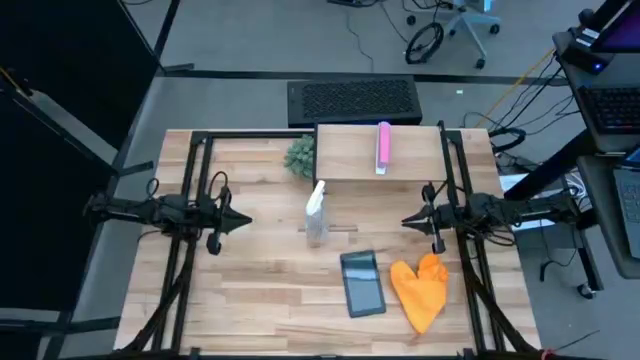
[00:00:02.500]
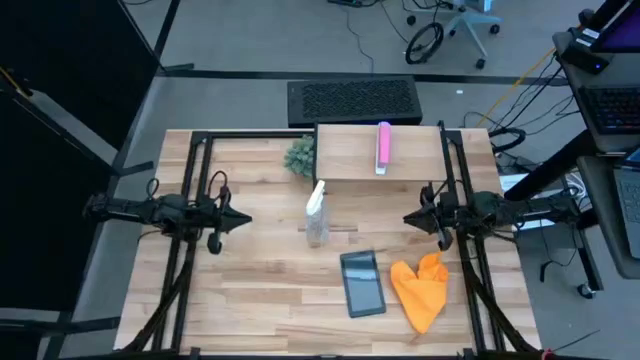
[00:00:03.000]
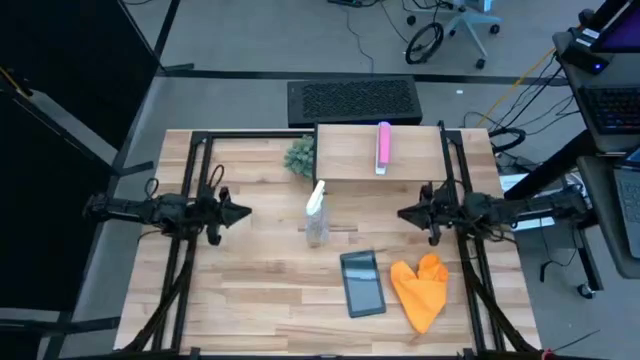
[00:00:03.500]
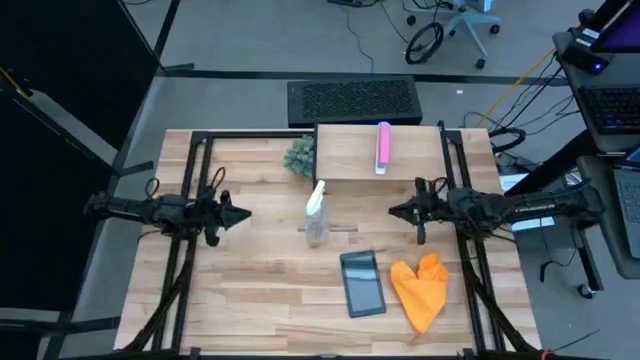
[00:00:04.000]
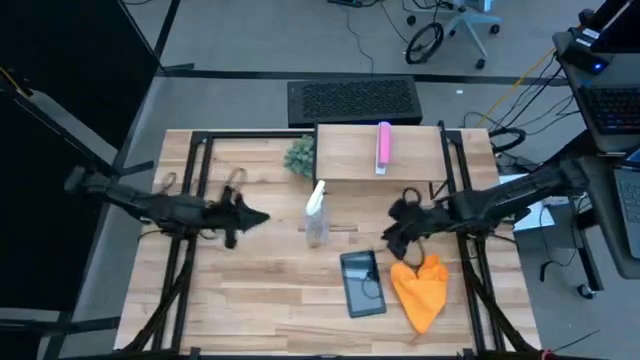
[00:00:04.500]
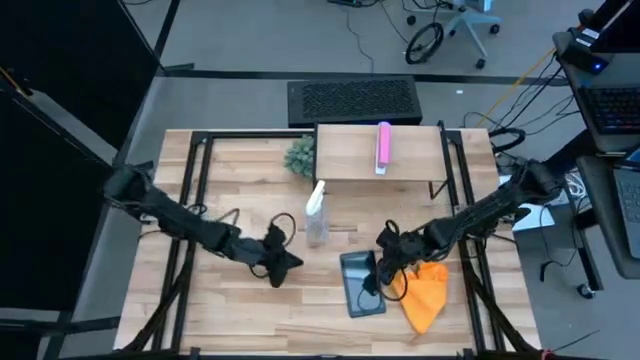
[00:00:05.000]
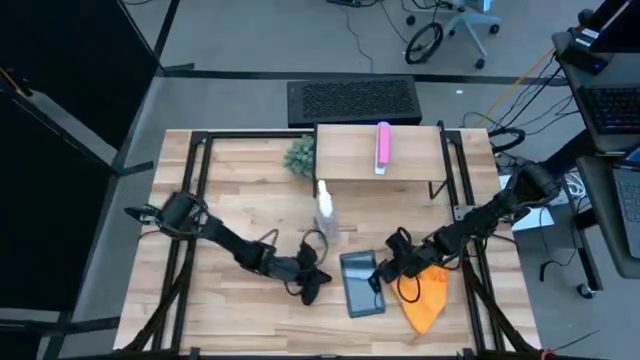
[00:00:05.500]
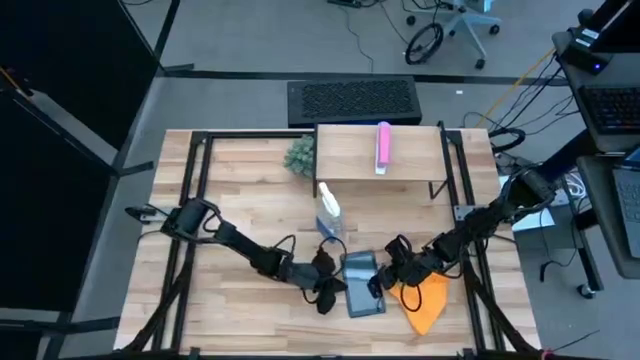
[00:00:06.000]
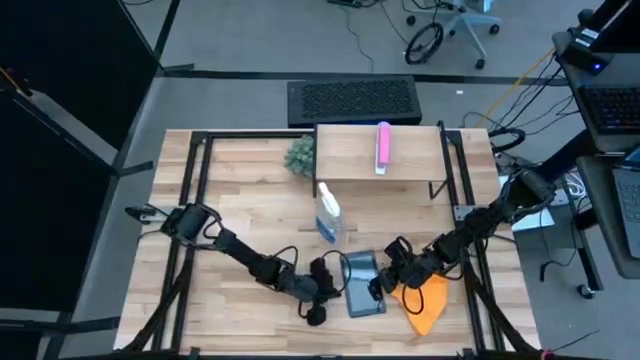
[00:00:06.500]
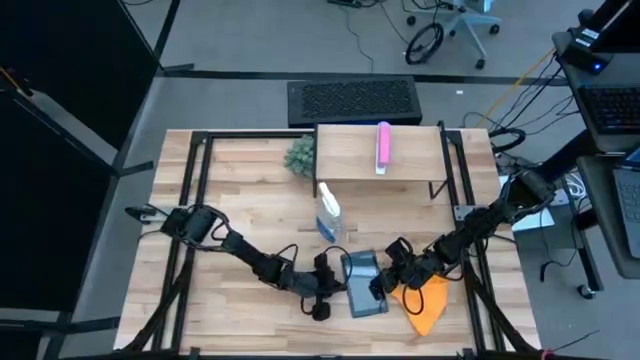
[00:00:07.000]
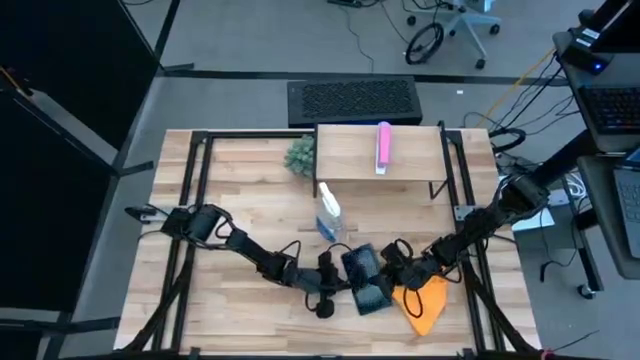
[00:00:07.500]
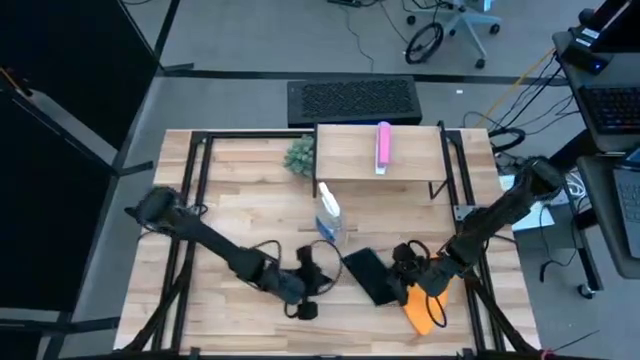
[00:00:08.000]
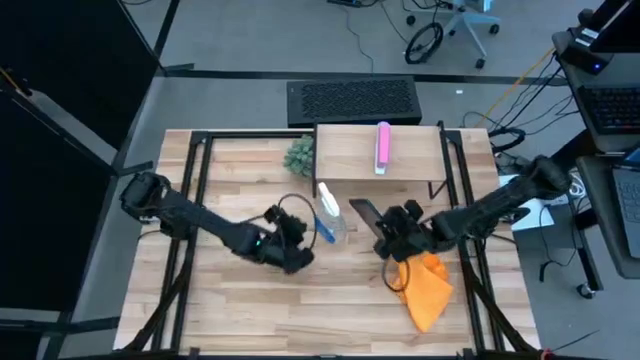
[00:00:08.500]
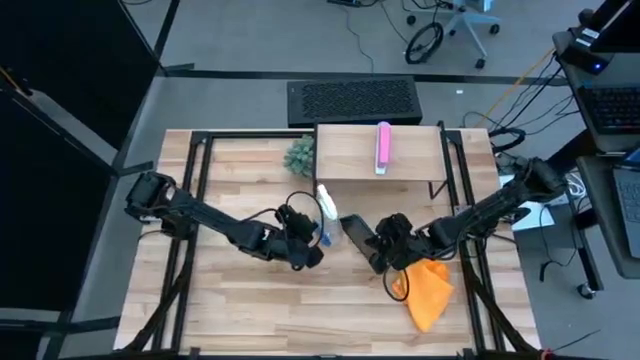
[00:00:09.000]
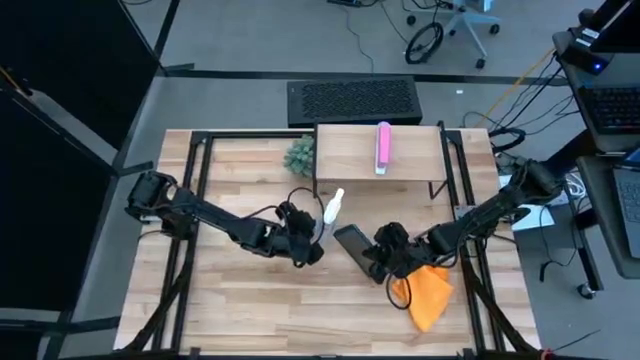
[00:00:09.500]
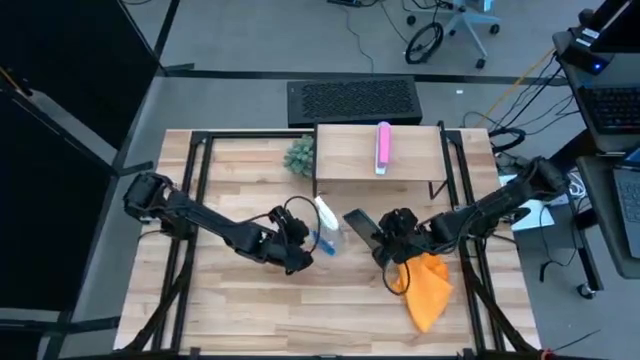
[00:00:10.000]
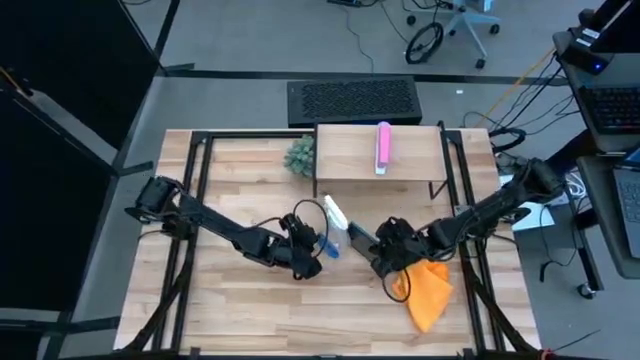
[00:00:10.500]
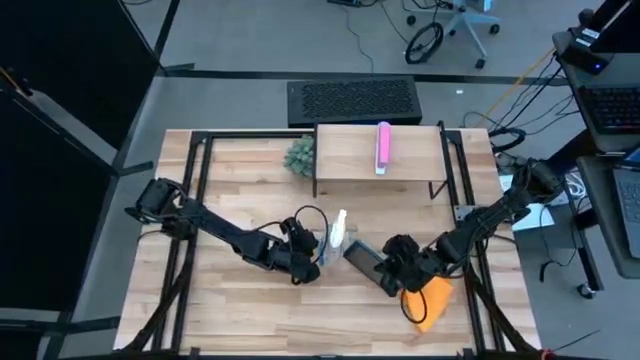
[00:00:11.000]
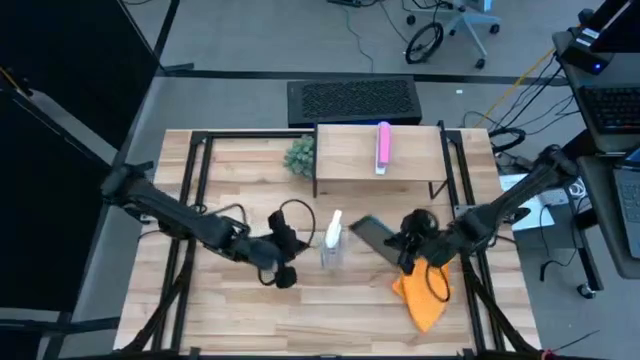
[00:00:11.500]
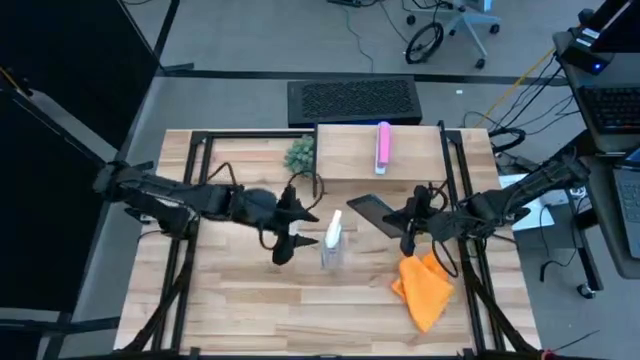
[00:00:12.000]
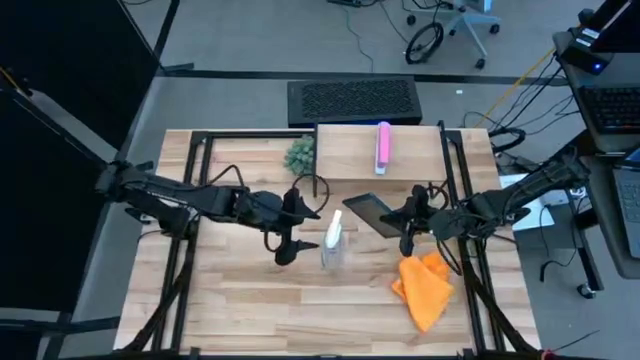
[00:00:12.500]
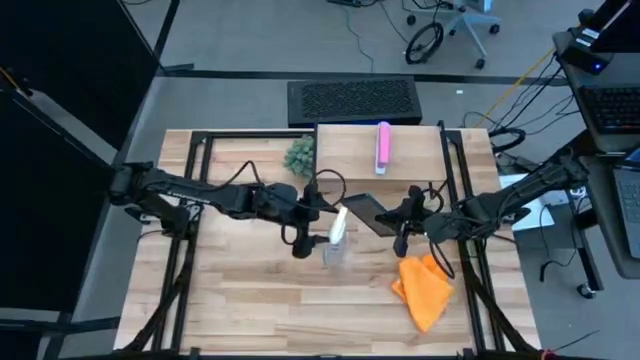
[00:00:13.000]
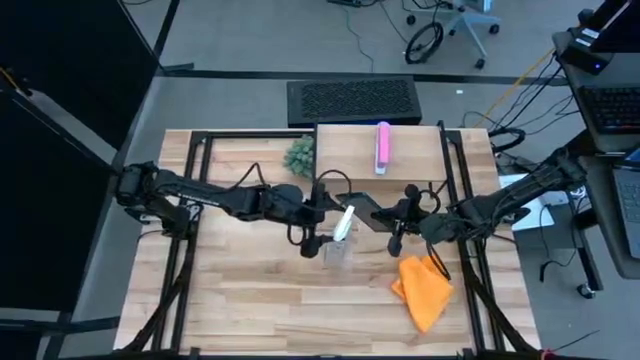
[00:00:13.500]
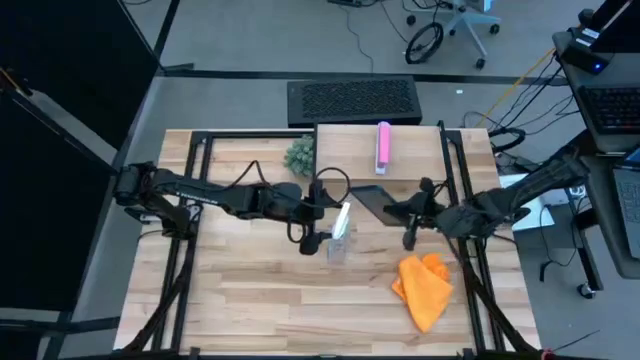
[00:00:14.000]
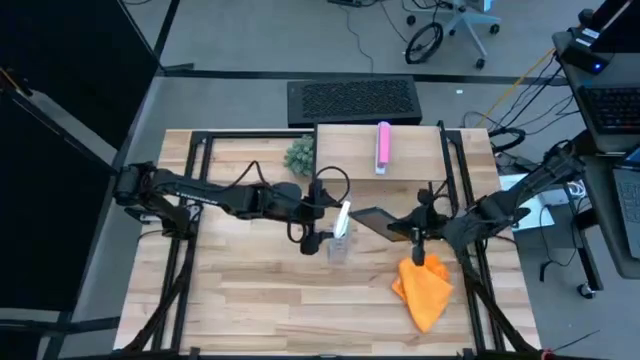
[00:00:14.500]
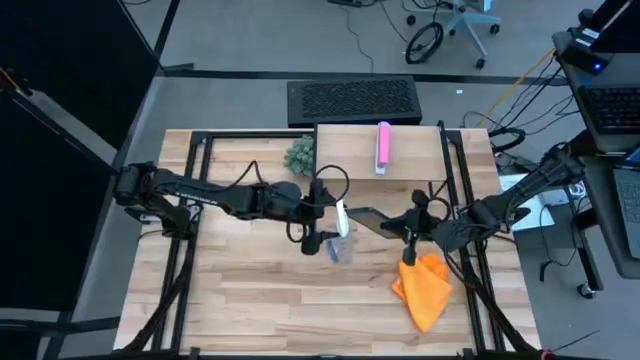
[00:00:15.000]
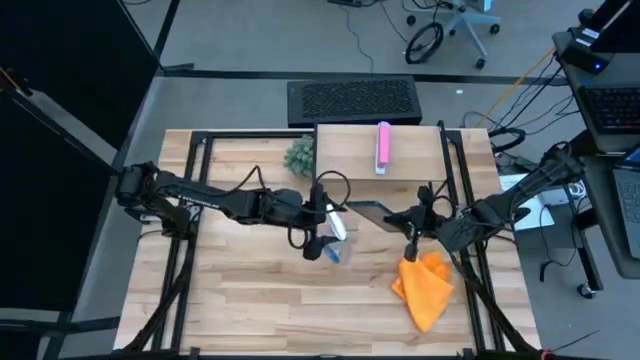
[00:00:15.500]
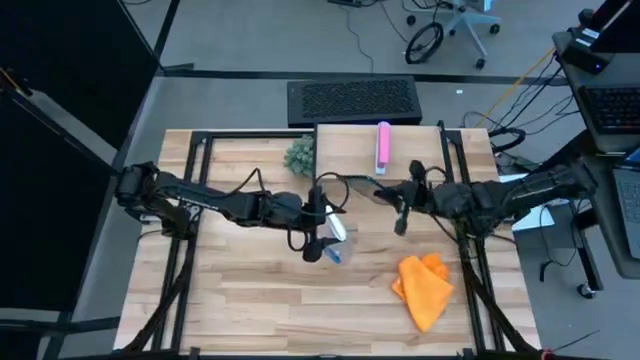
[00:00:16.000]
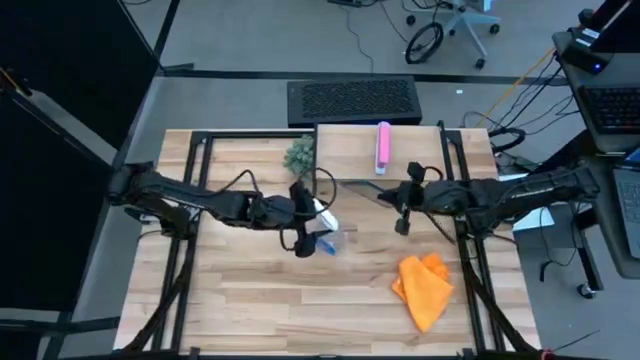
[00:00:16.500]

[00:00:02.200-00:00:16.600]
Task: Apply microfiber cloth
Spray the tablet with the bottle cleaner

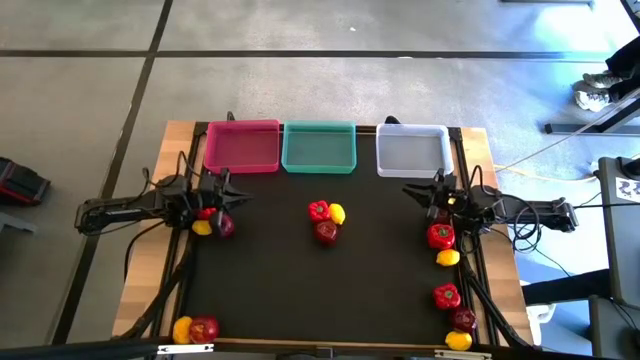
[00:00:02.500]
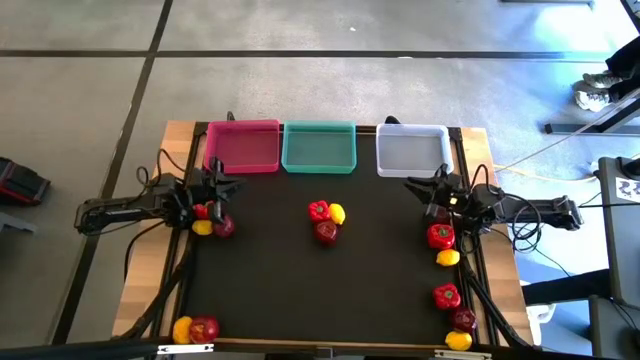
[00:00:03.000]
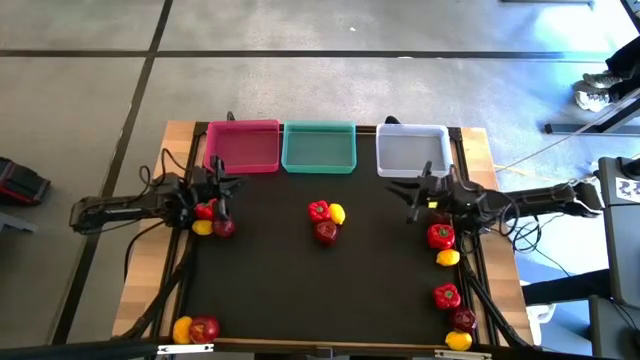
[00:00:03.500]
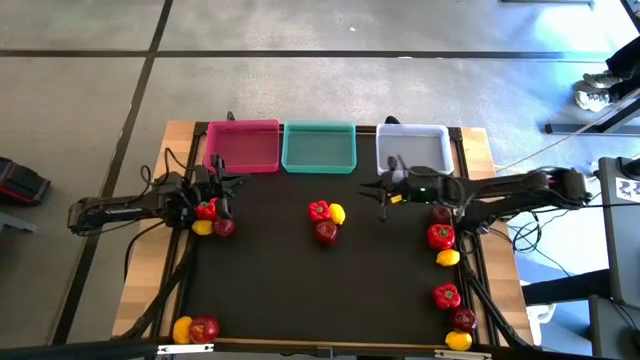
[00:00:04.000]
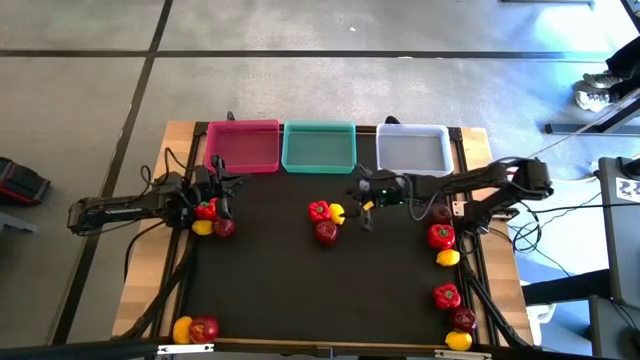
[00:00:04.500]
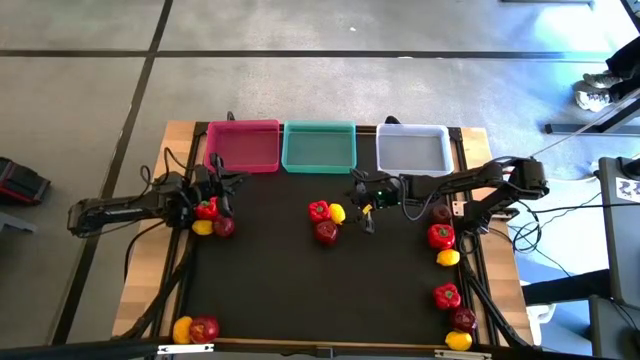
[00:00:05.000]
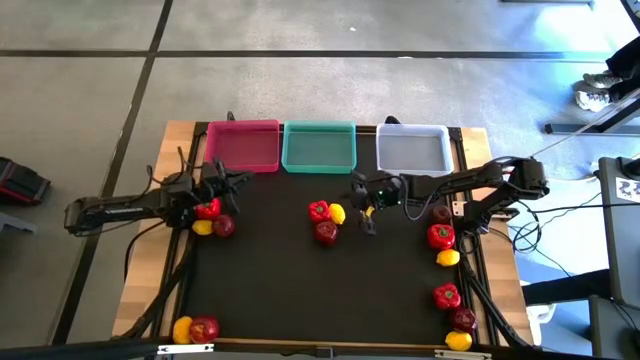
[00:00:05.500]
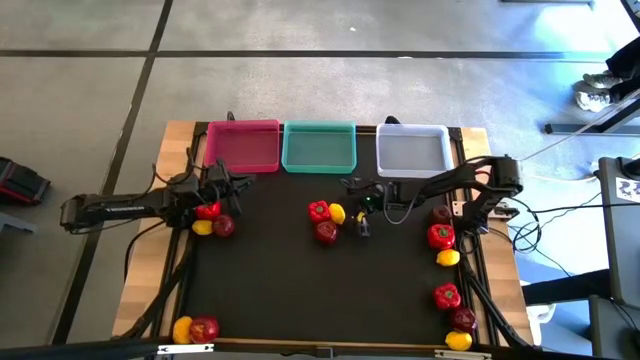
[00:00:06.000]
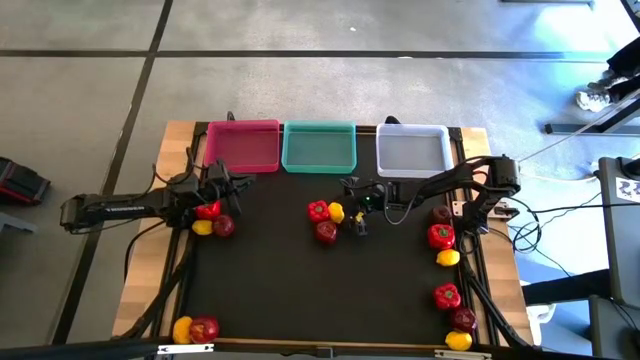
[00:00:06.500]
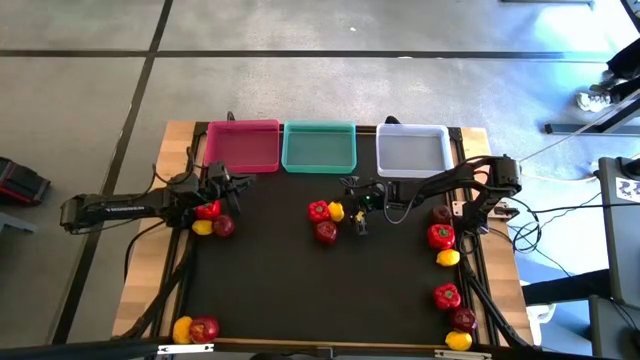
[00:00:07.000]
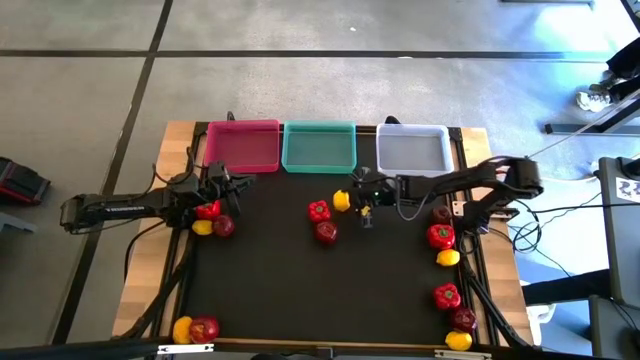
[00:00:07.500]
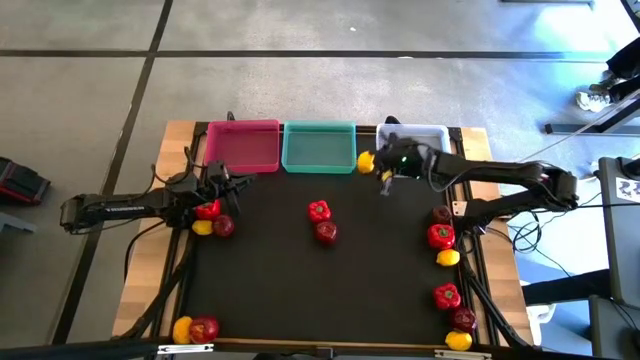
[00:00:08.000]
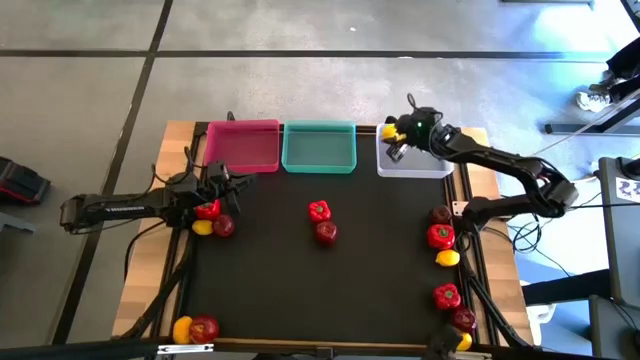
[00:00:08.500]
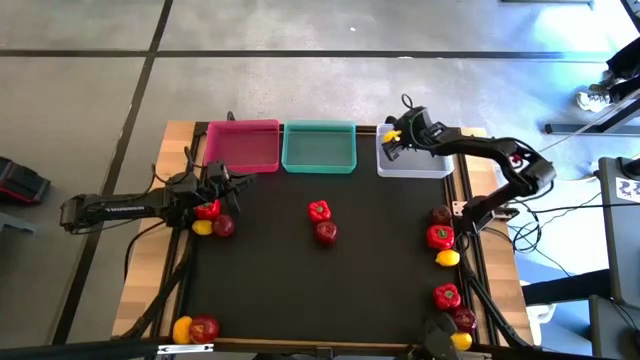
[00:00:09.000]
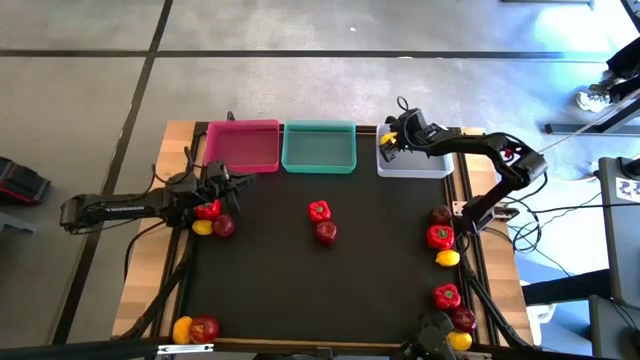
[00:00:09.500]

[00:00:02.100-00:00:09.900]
Task: Sort produce into baskets
Put the lemon into the white bin
